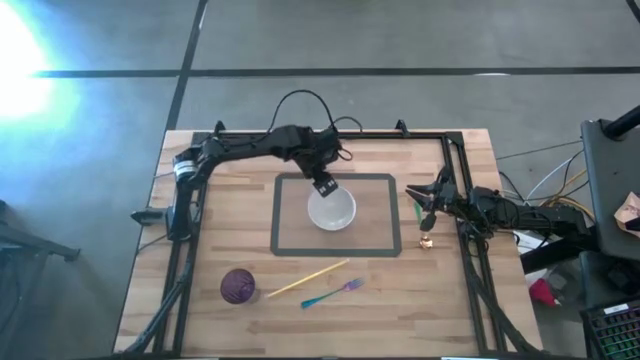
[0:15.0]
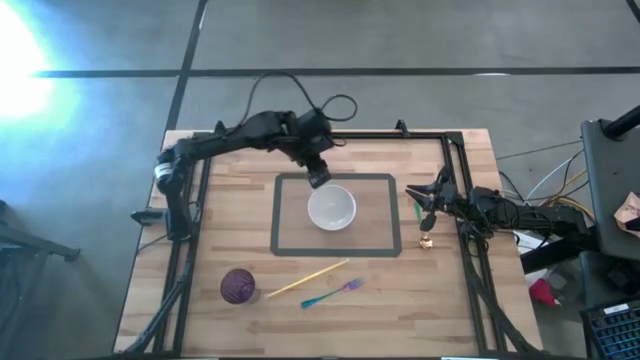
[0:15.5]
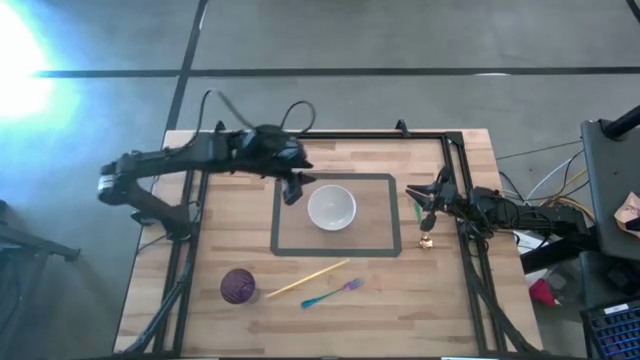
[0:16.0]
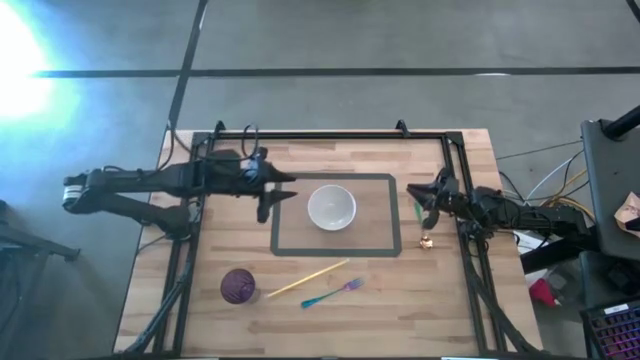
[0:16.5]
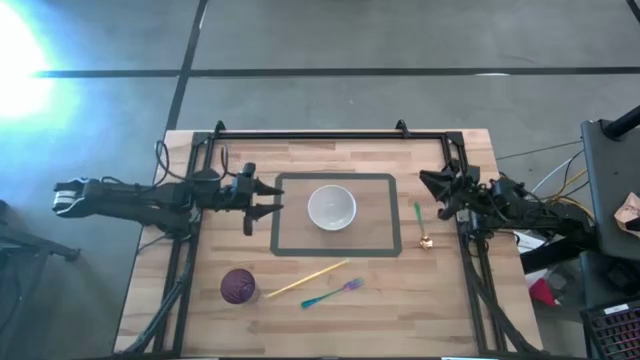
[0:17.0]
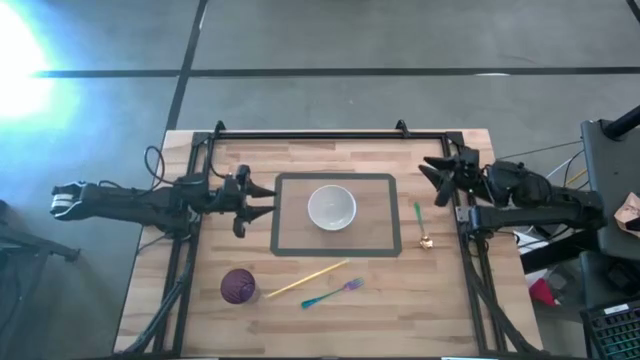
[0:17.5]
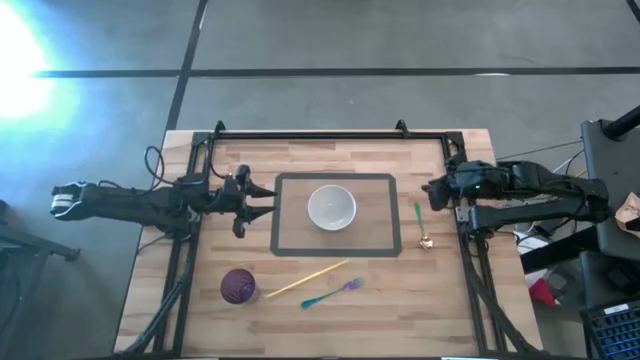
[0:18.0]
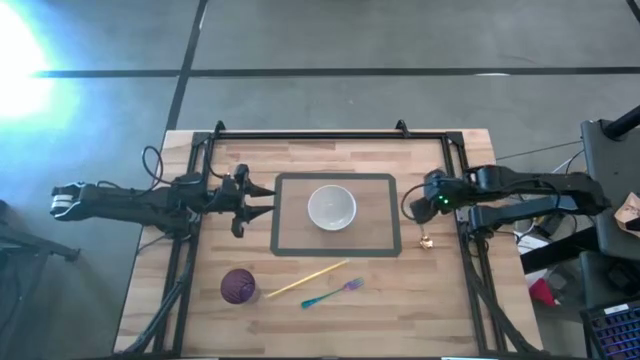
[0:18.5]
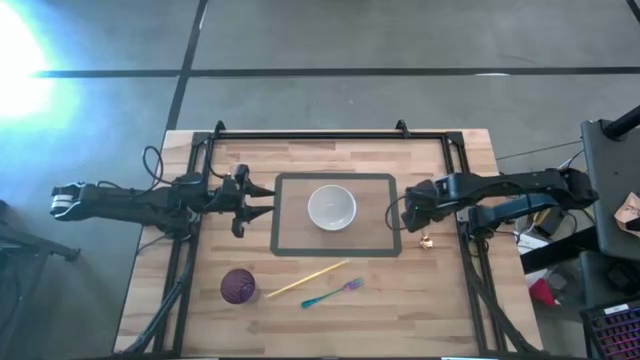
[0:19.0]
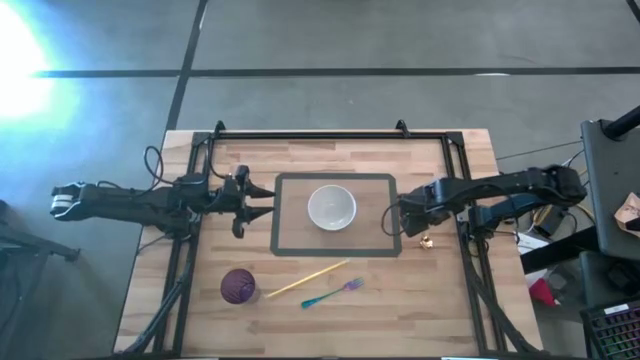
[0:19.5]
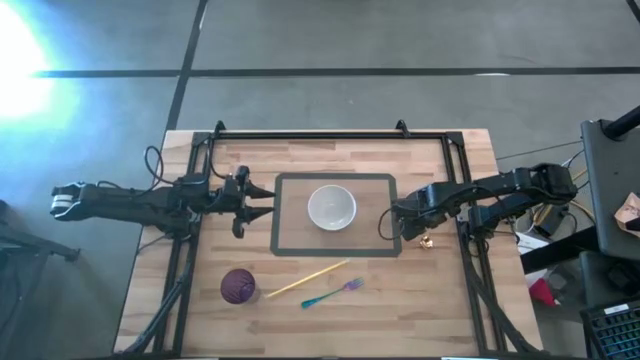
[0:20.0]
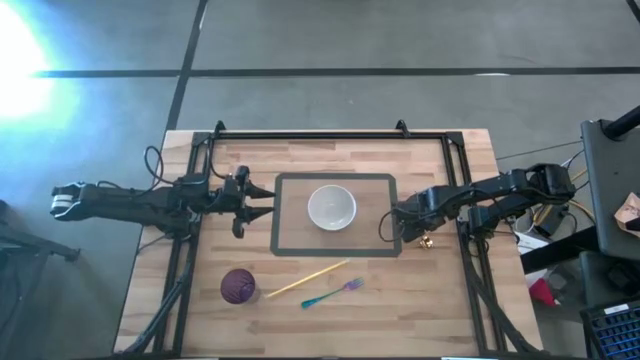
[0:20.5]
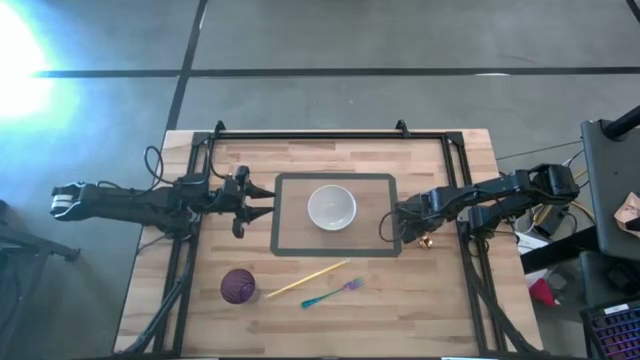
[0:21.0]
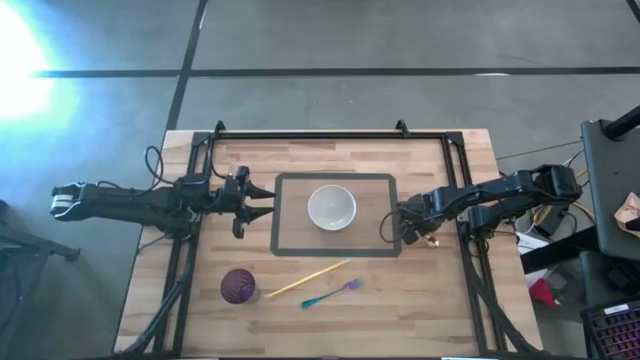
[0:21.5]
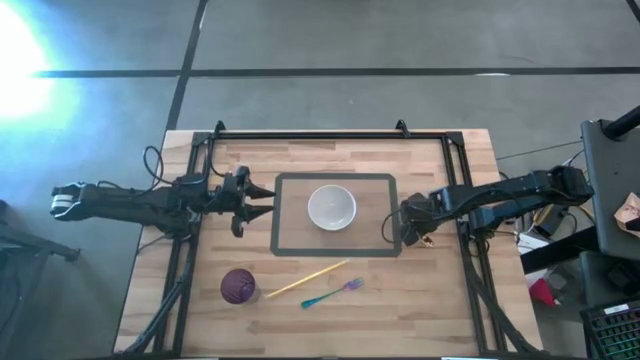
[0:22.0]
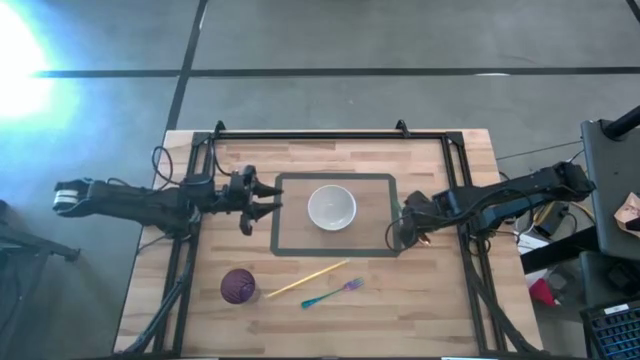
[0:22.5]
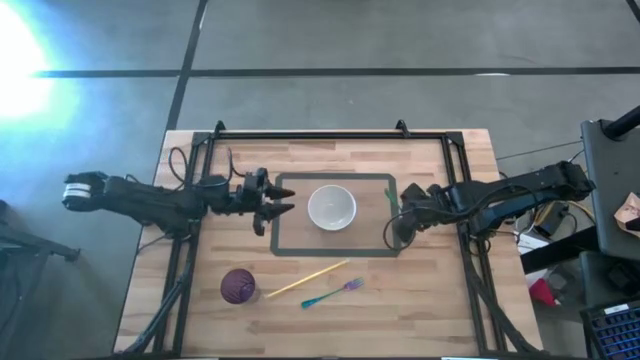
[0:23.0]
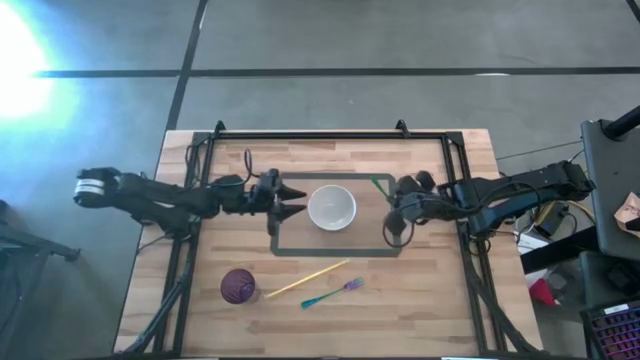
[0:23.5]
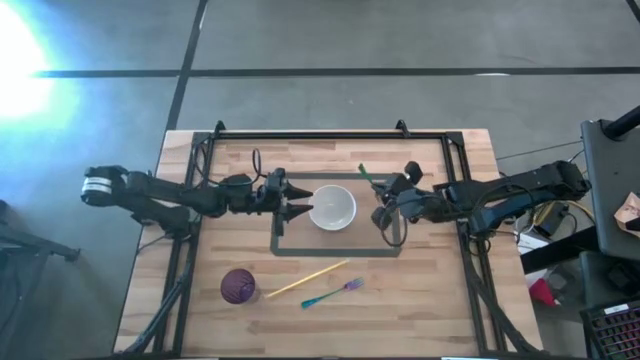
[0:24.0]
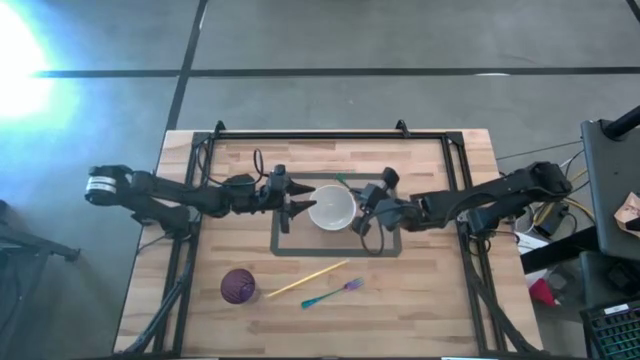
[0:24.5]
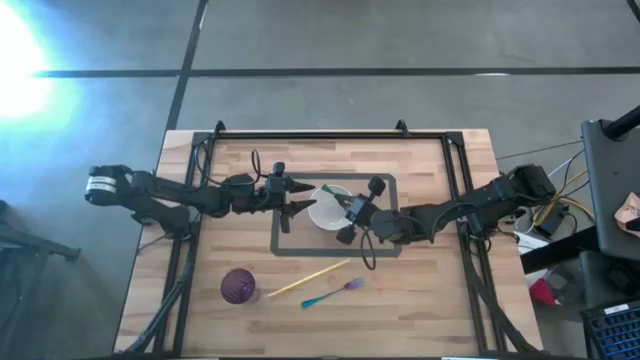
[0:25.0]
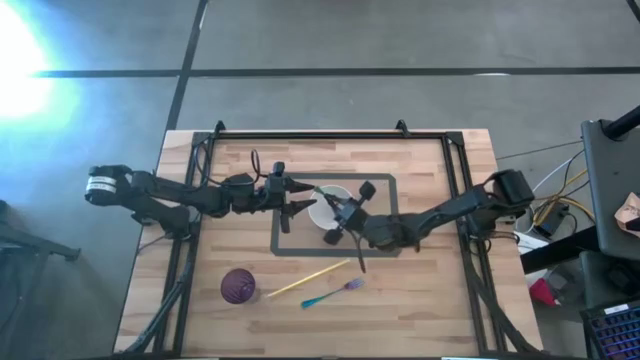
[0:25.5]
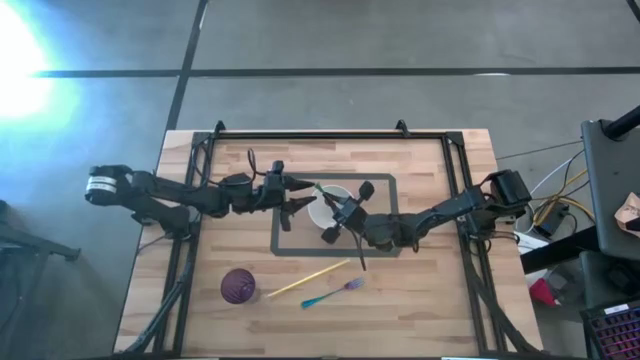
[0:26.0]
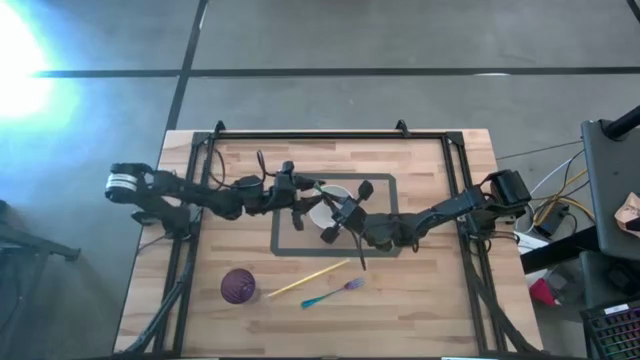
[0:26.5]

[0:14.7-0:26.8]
Task: Pick & Place Utensil
Put the golden spoon into the white bowl on the brown placemat

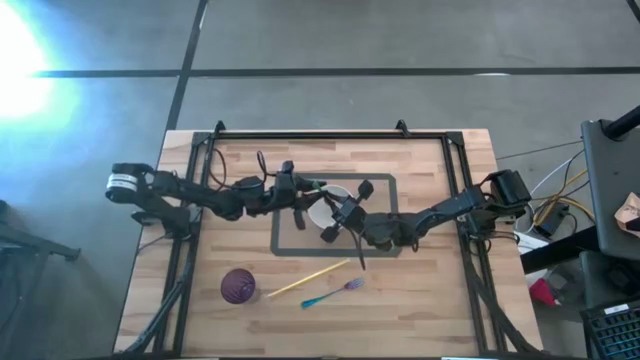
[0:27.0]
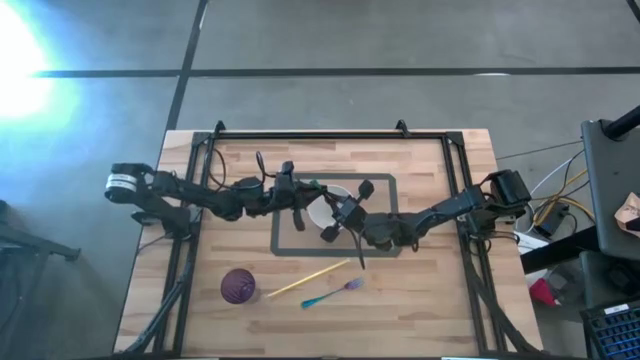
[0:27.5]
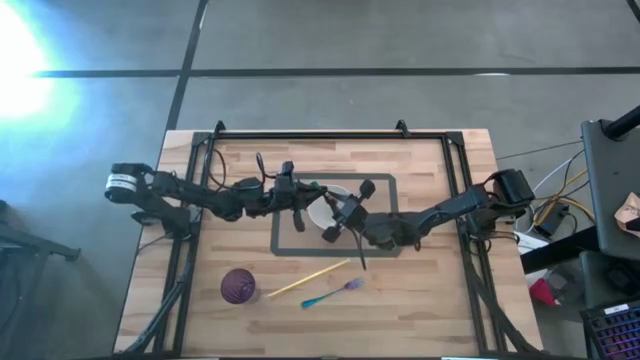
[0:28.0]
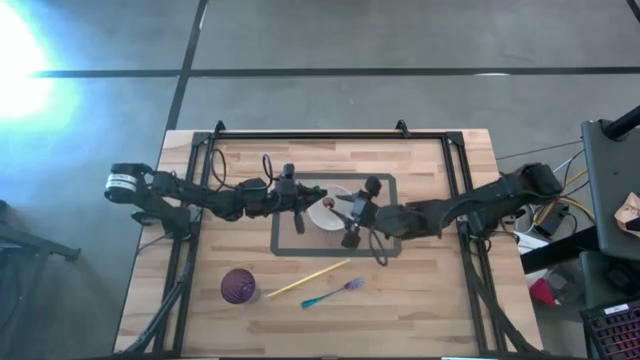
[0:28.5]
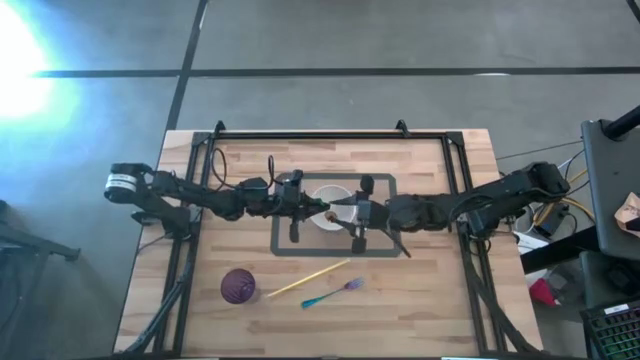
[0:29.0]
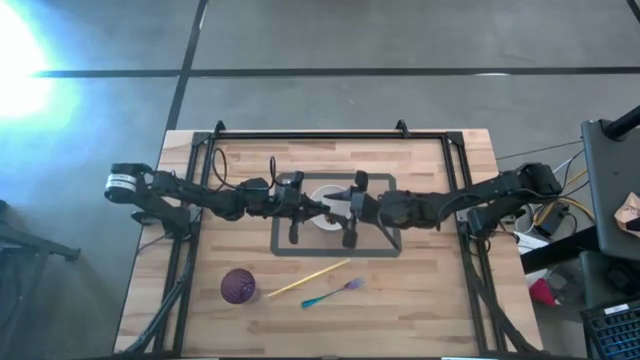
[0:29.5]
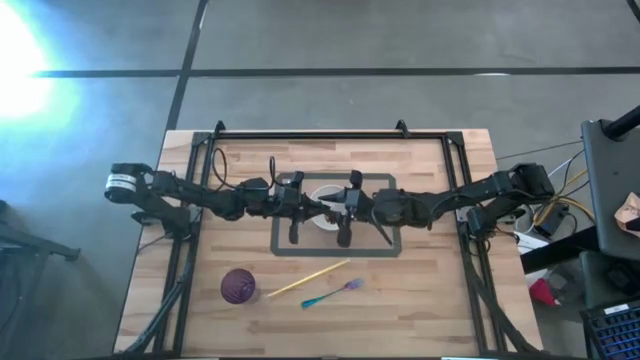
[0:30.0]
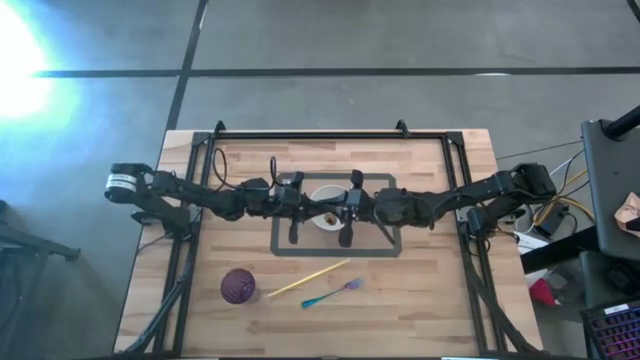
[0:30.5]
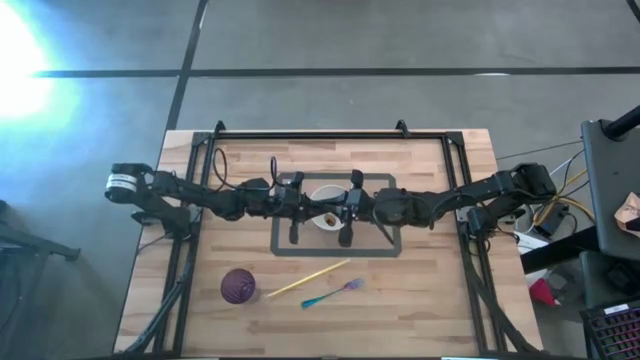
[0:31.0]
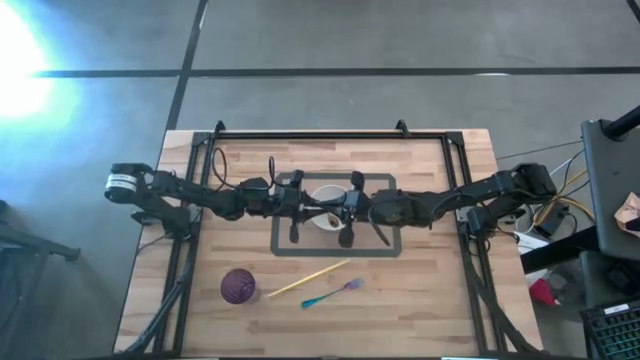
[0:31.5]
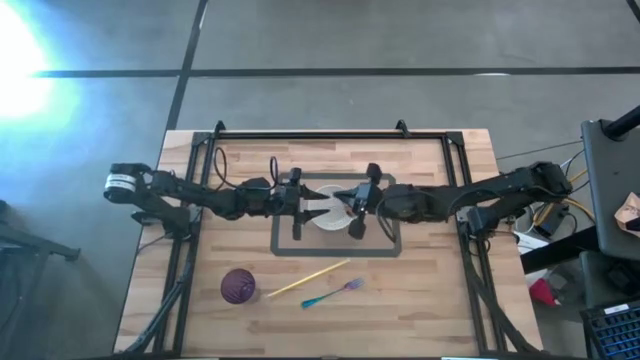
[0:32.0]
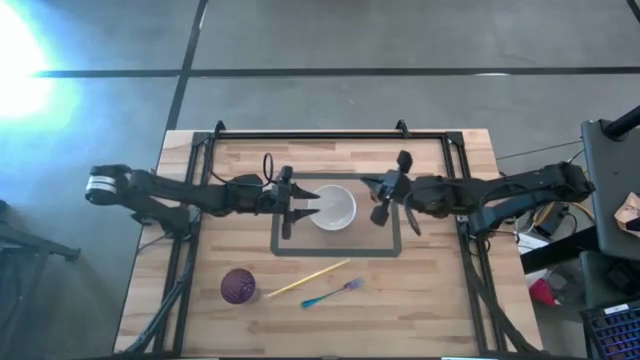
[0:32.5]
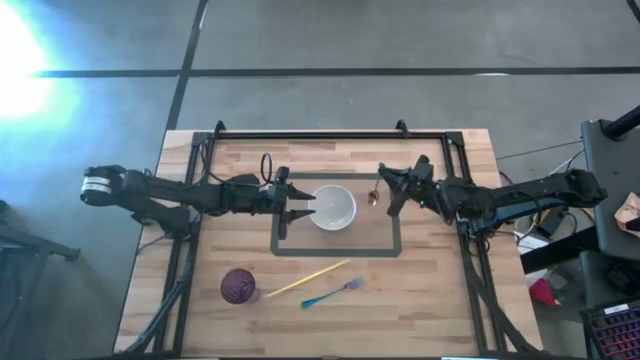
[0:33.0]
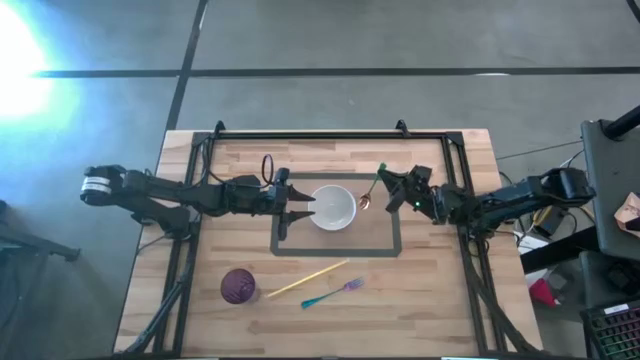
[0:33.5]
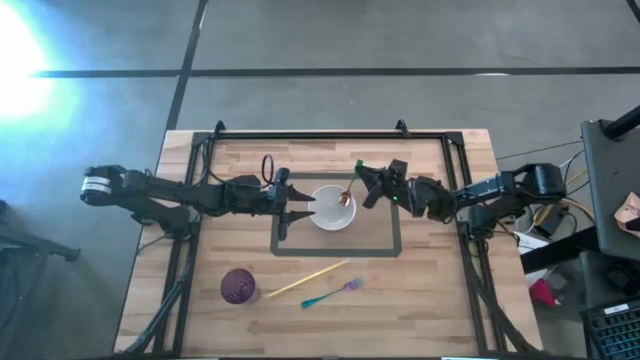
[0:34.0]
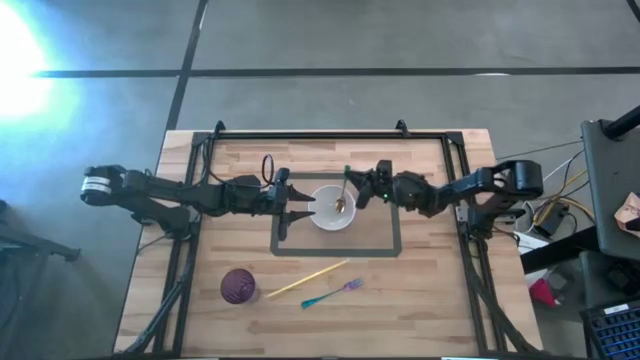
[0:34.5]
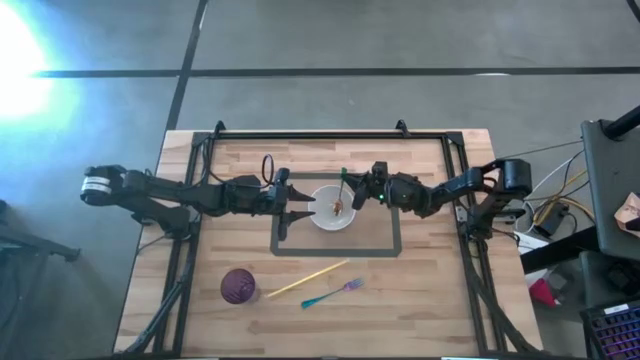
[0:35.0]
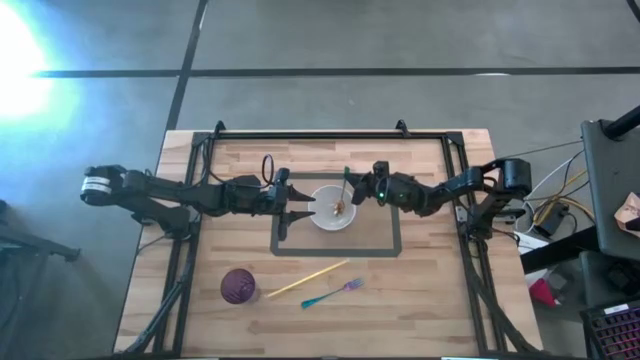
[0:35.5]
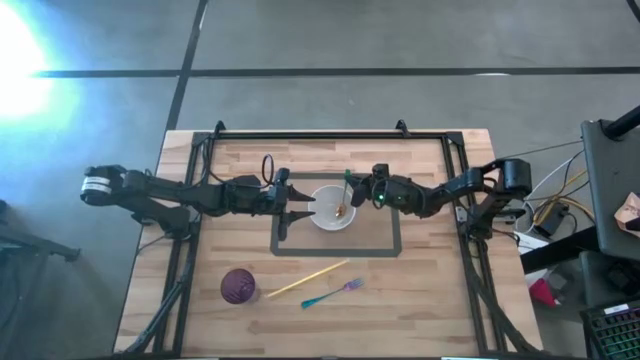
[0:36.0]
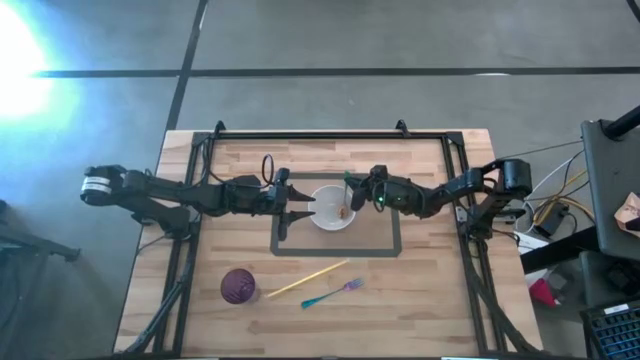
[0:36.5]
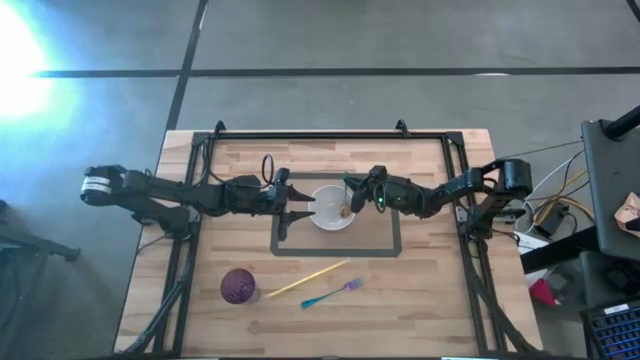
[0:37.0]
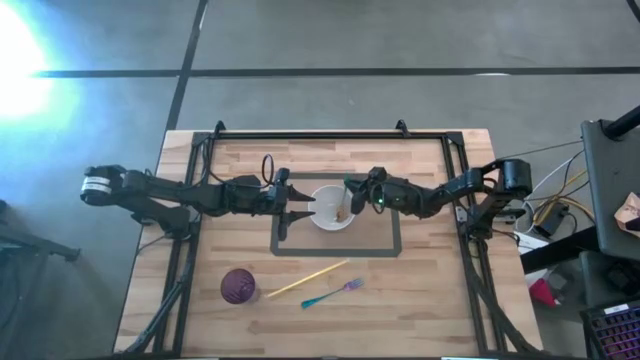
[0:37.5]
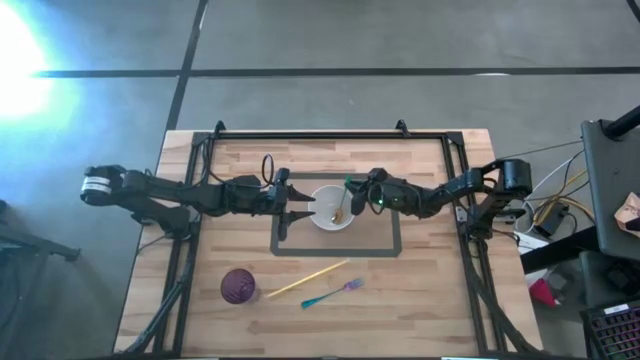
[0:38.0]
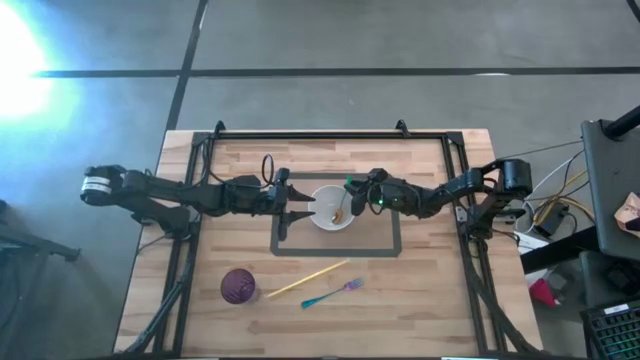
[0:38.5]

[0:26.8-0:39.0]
Put the golden spoon into the white bowl on the brown placemat
